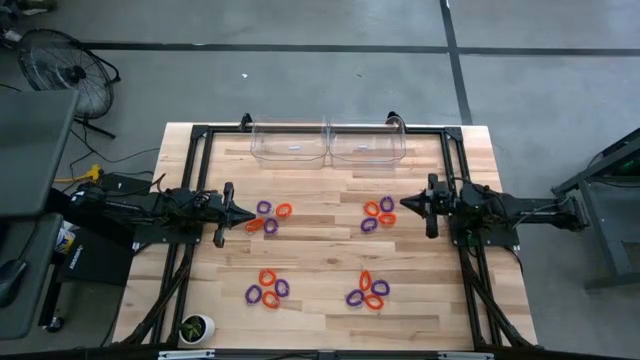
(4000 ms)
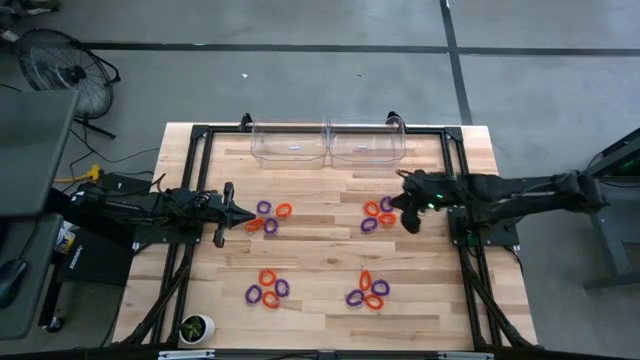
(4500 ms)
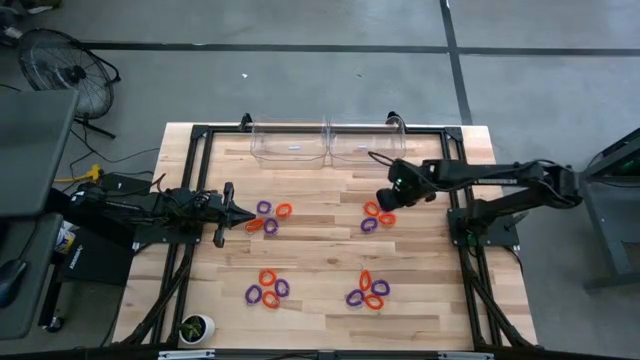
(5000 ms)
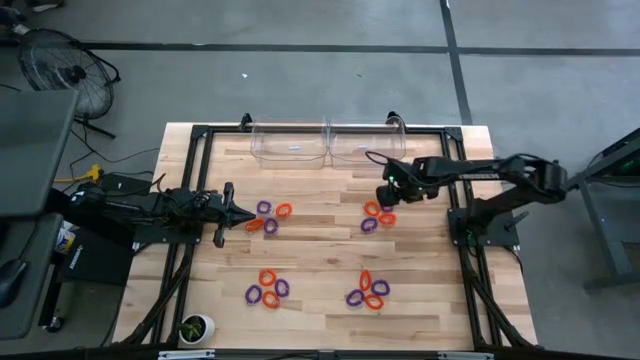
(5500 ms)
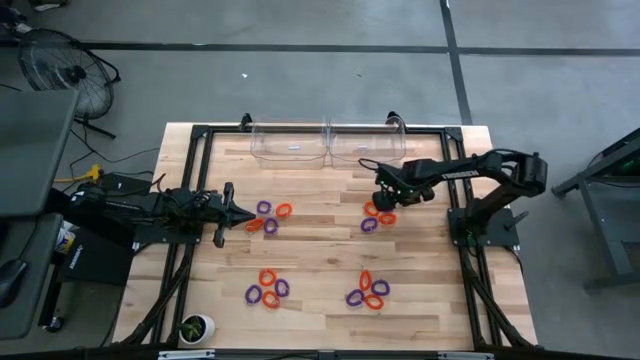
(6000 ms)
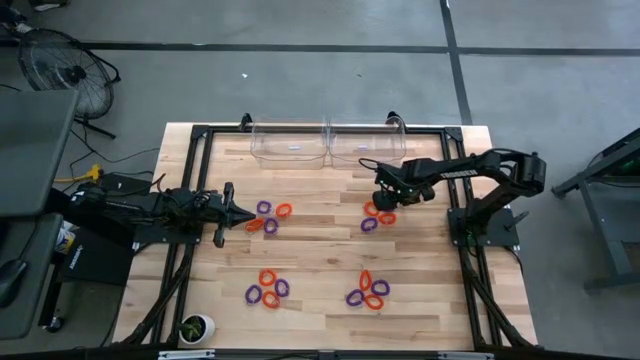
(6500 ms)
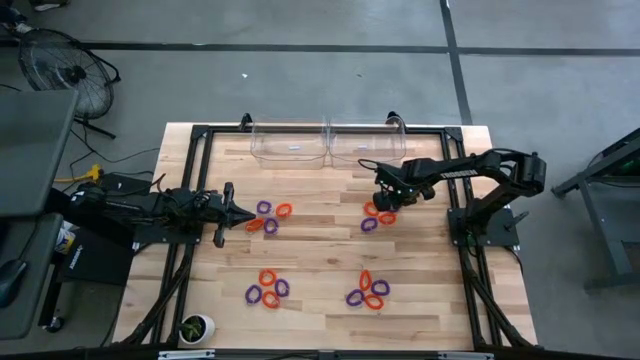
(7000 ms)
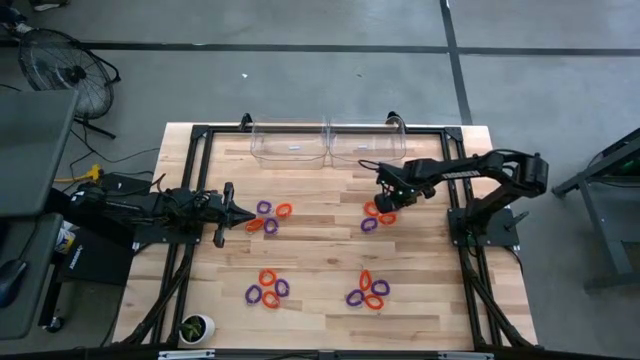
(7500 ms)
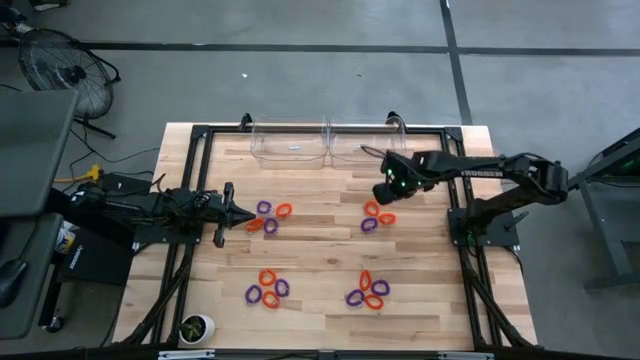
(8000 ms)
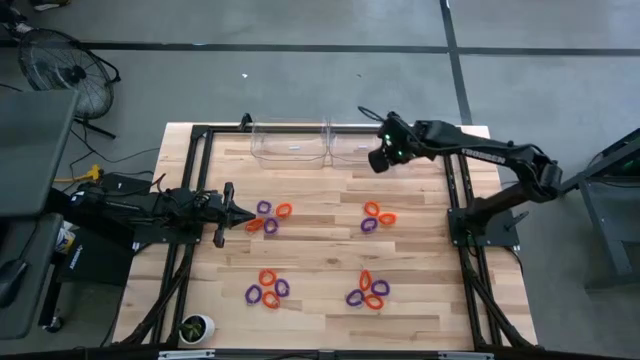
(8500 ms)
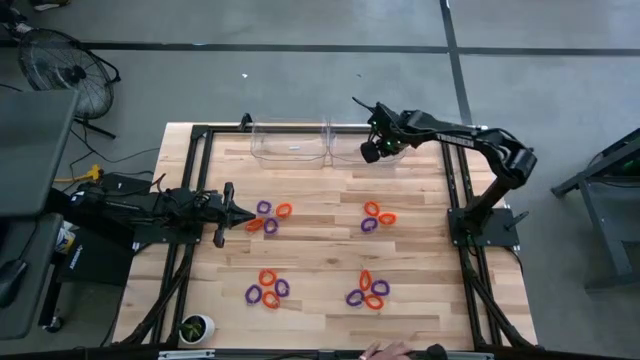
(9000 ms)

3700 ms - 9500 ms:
Task: Sort spring keychains
Put the violet spring keychain into the right transparent bin

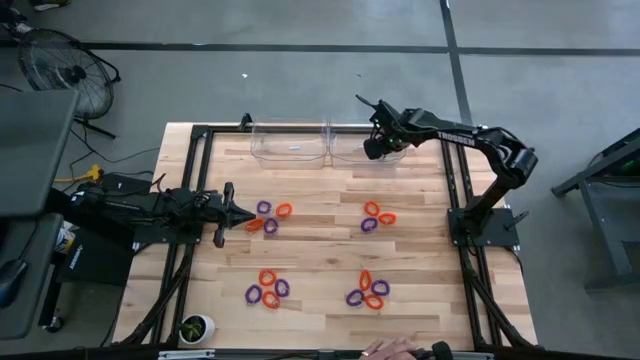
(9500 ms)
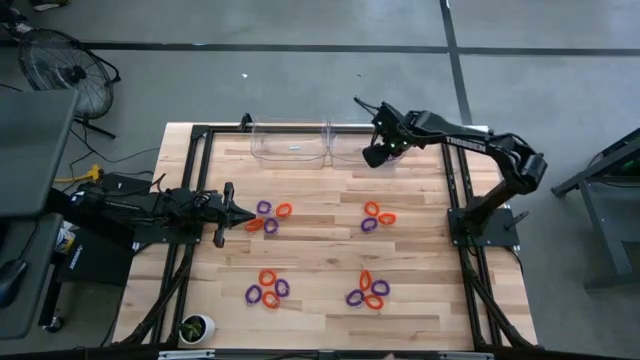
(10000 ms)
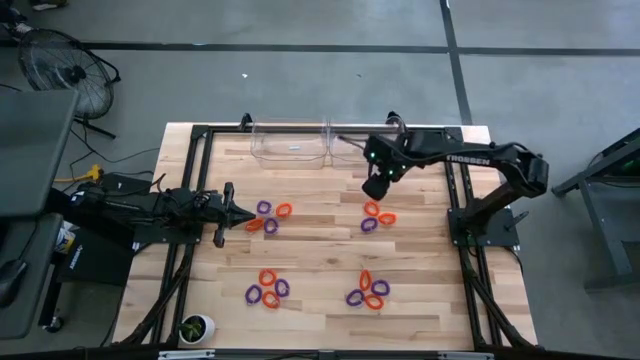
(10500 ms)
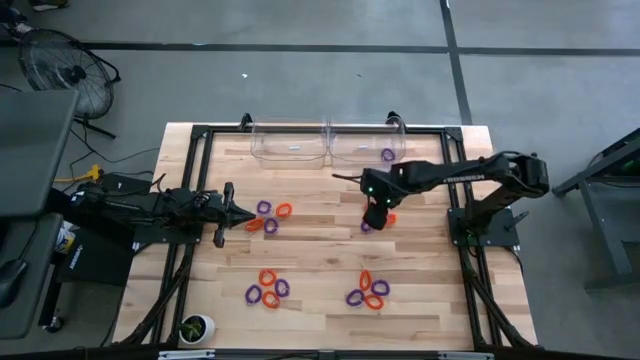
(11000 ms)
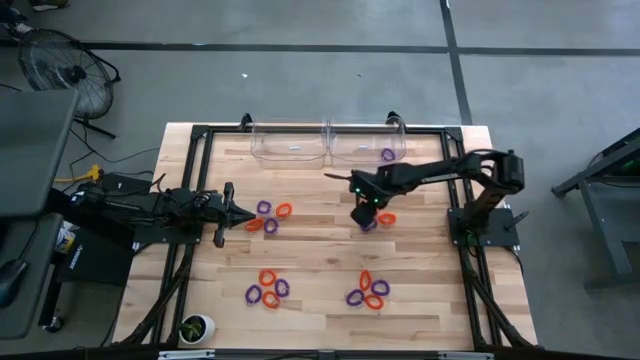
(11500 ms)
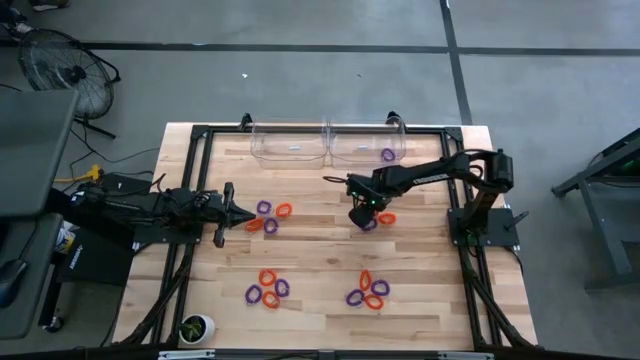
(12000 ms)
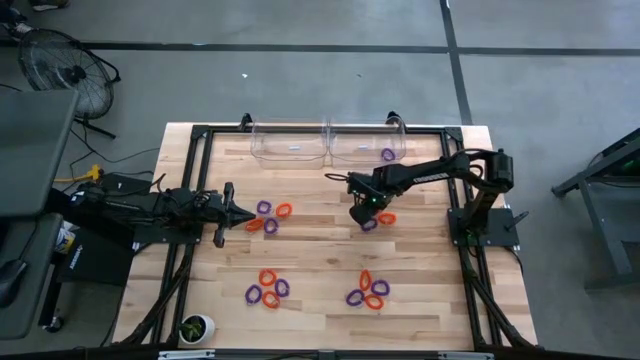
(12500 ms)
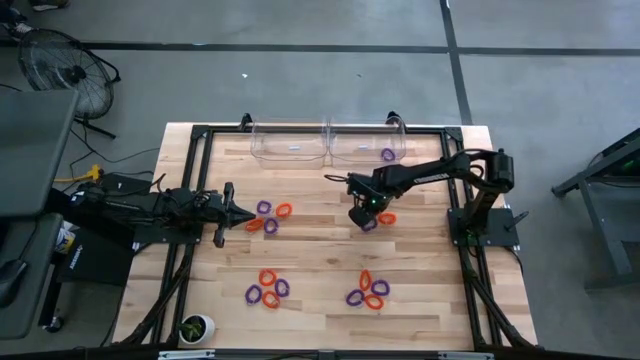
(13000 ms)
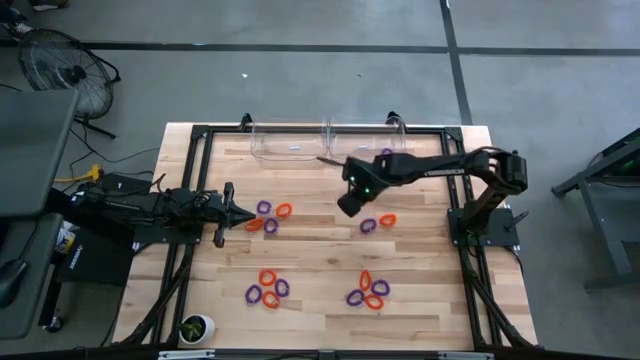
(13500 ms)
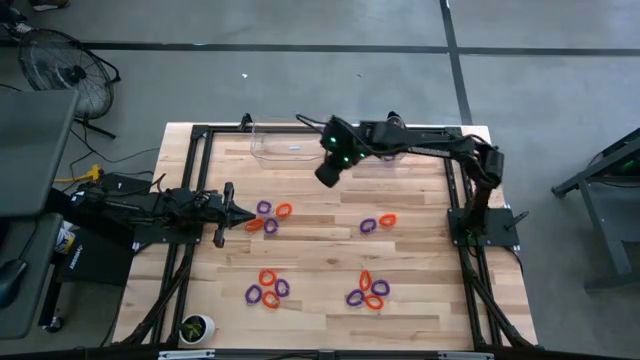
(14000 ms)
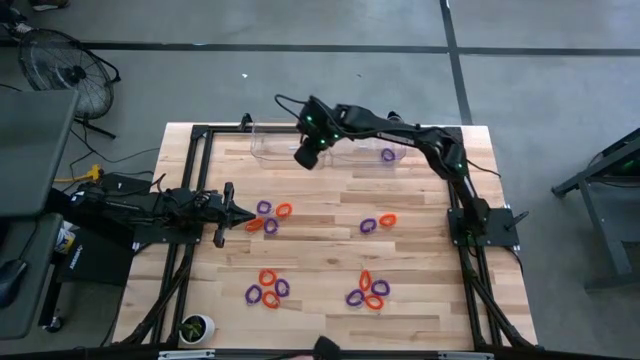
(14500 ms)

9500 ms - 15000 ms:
Put the orange spring keychain into the left transparent bin

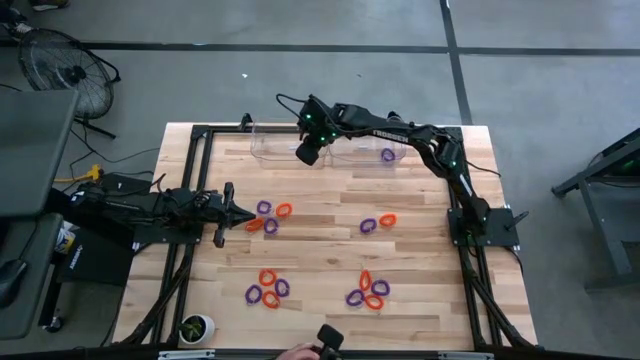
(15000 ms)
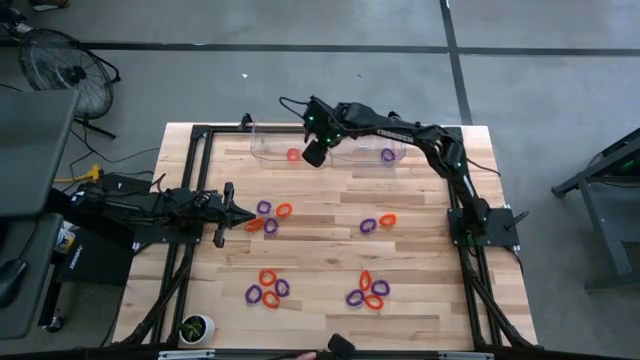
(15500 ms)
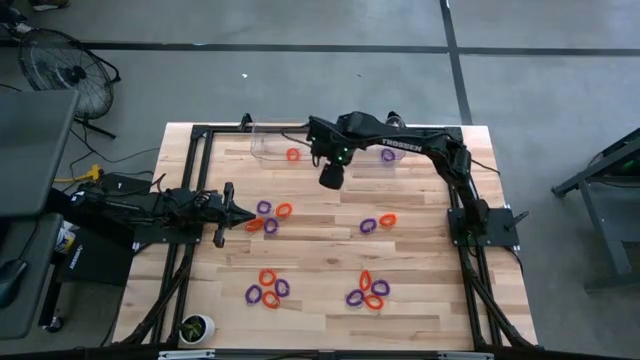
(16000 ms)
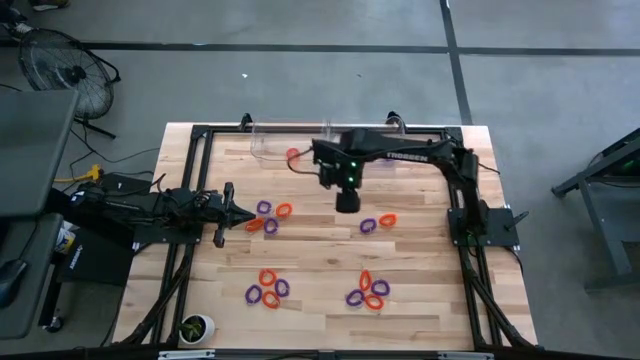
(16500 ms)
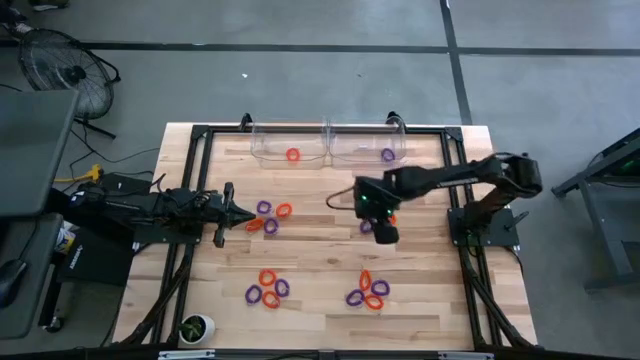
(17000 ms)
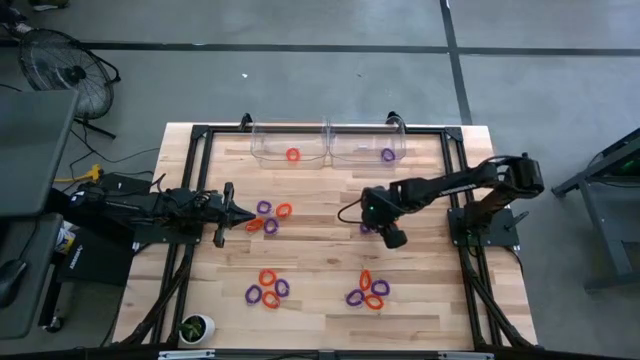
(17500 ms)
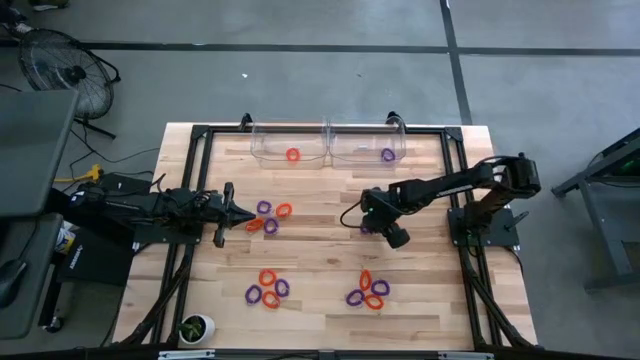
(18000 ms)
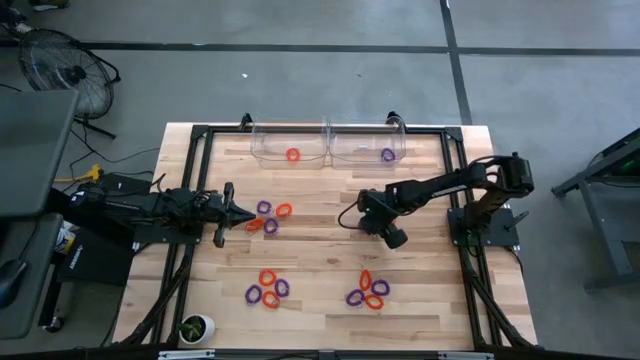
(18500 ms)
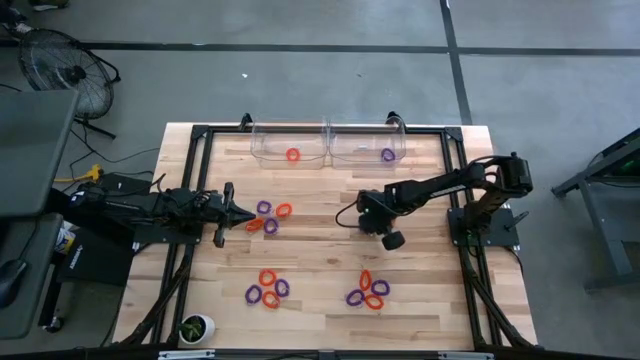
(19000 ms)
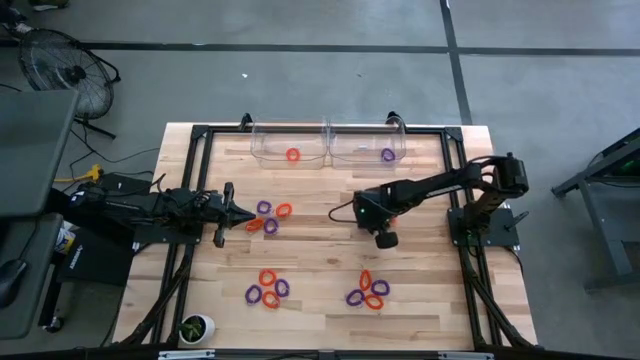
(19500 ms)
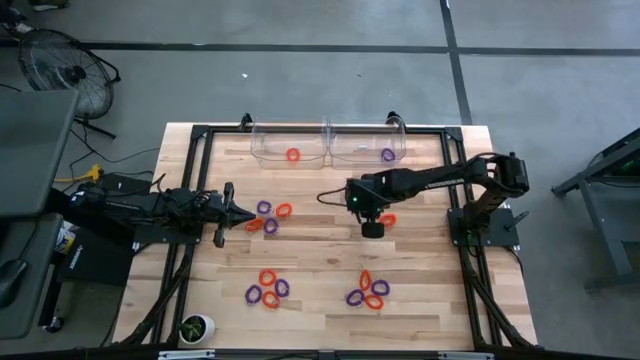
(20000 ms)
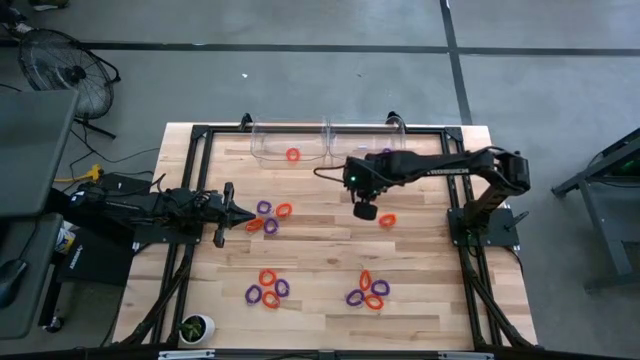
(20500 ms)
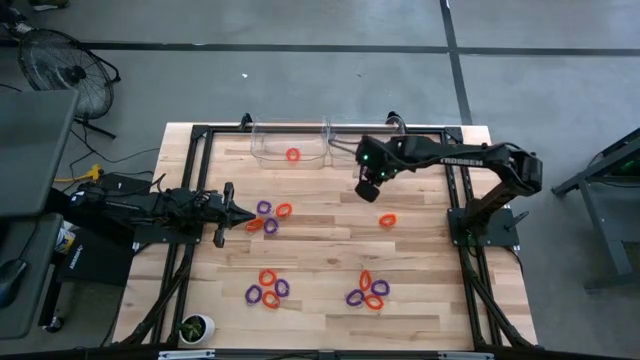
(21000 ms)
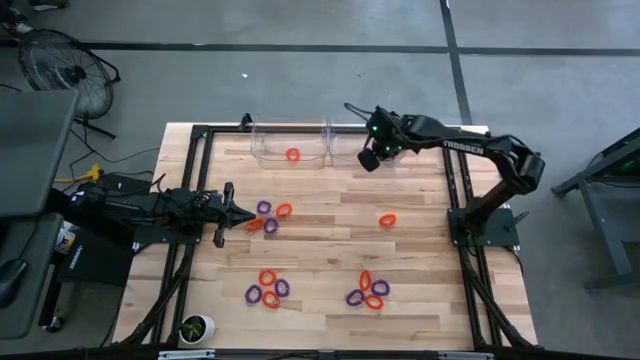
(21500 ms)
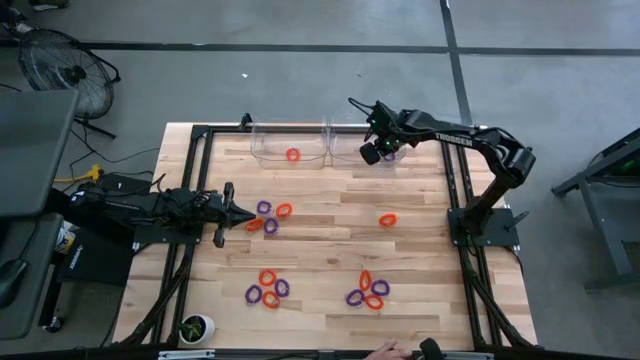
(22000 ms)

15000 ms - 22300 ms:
Put the violet spring keychain into the right transparent bin

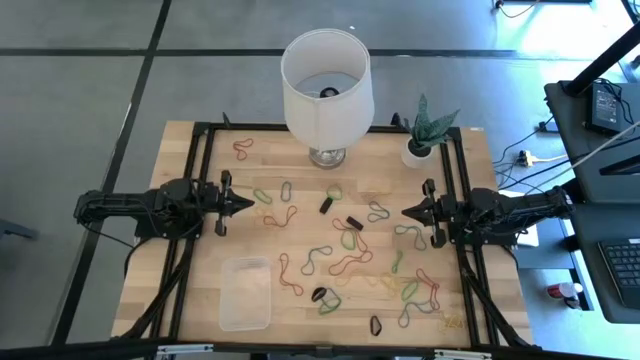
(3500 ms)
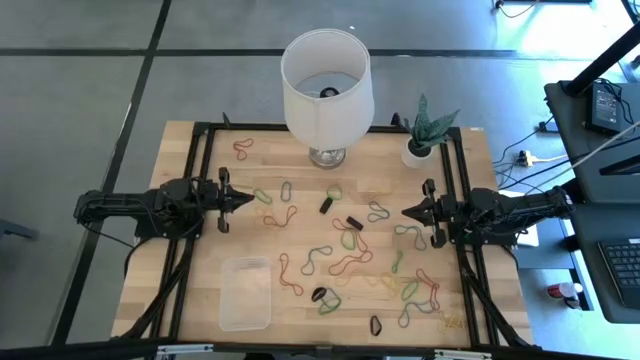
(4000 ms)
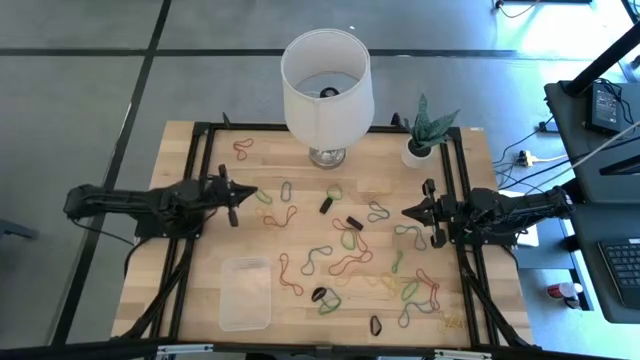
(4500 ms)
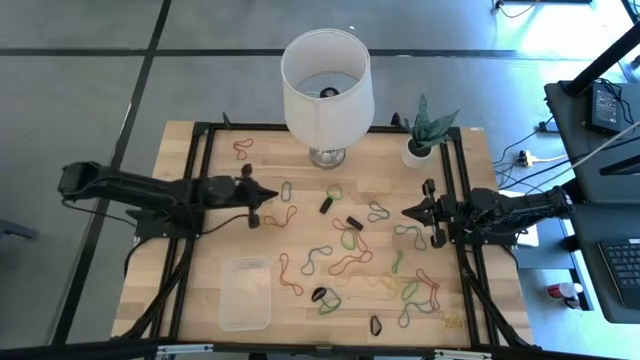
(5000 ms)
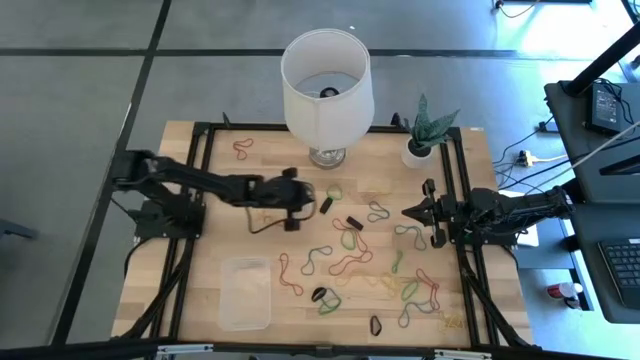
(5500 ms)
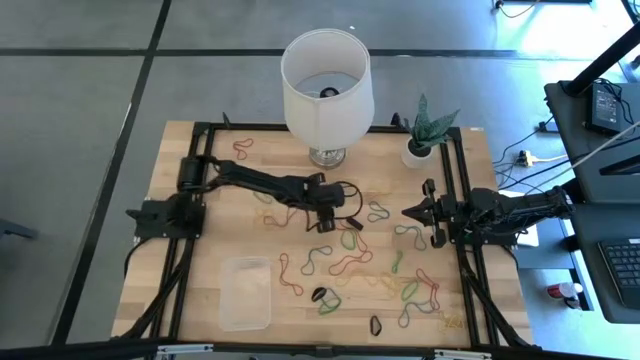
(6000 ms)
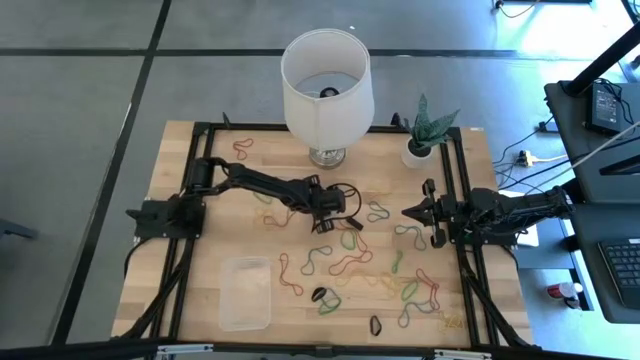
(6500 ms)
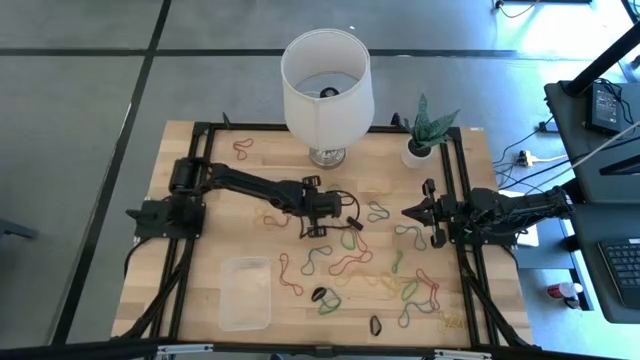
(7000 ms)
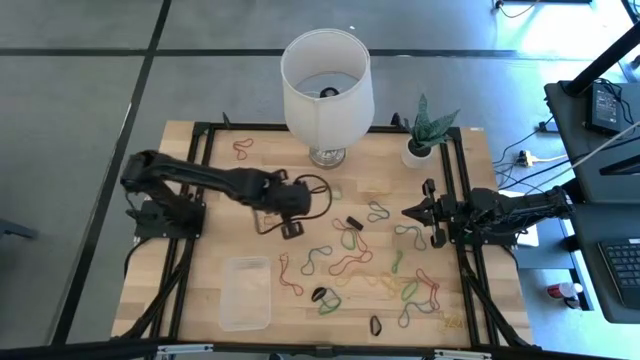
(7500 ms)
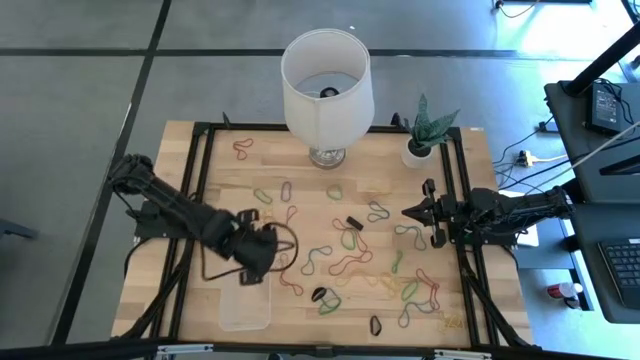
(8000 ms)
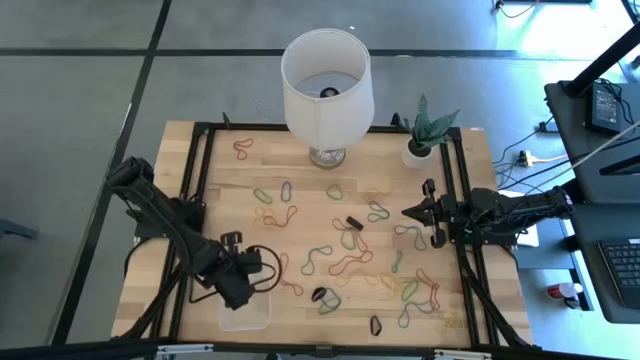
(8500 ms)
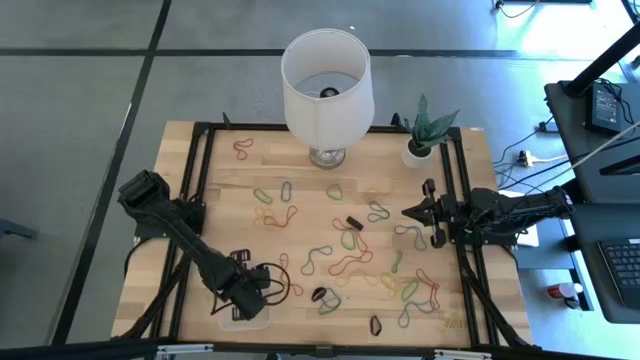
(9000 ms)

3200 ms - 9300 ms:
Task: Pick and place rubber bands into bin
Put the black rubber band into the transparent bin
